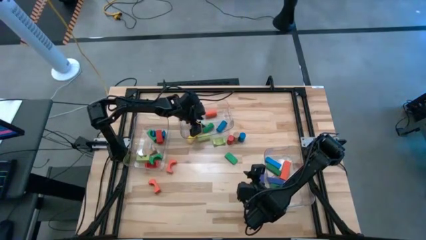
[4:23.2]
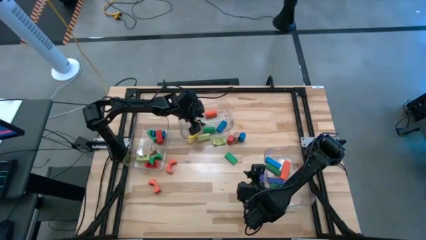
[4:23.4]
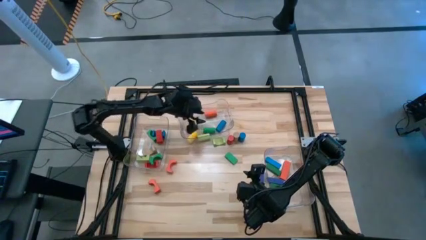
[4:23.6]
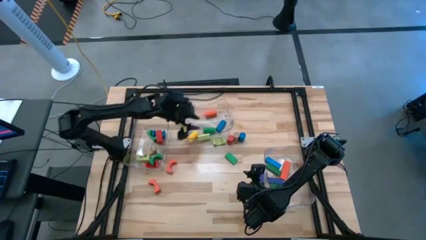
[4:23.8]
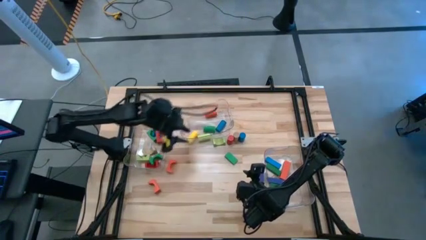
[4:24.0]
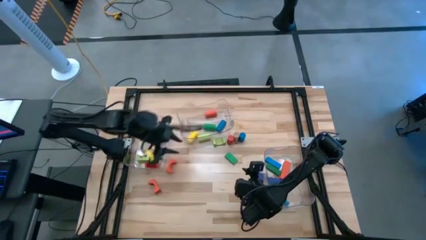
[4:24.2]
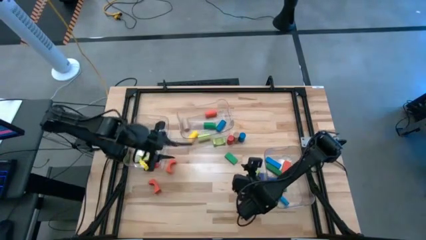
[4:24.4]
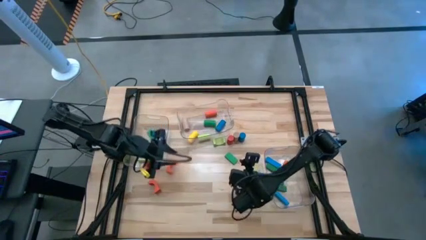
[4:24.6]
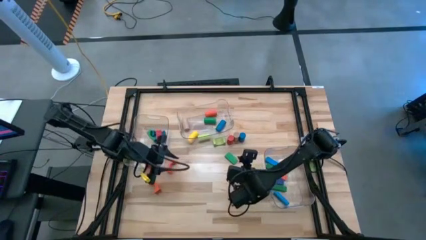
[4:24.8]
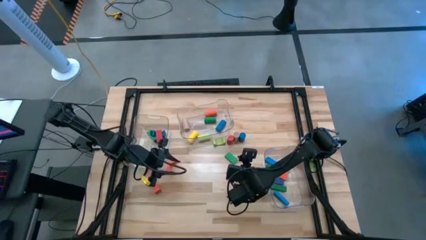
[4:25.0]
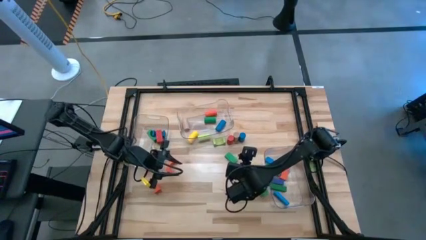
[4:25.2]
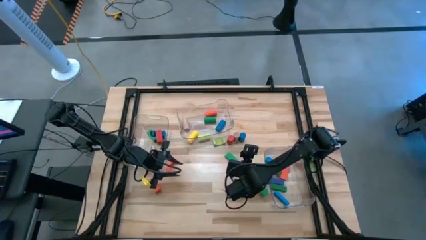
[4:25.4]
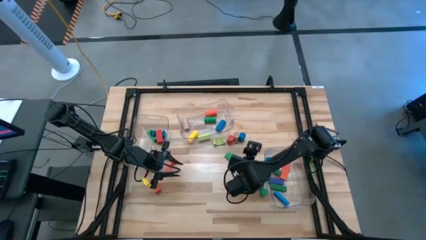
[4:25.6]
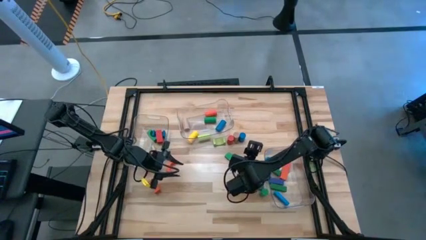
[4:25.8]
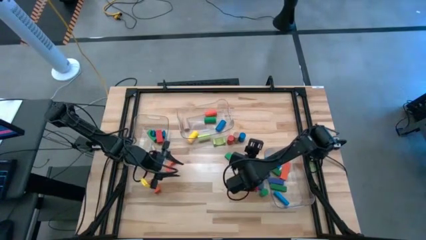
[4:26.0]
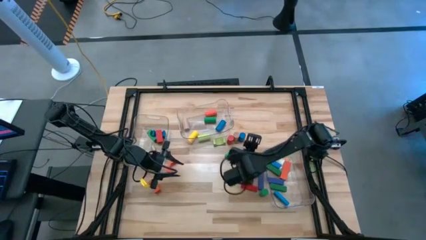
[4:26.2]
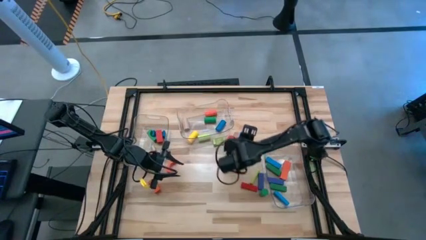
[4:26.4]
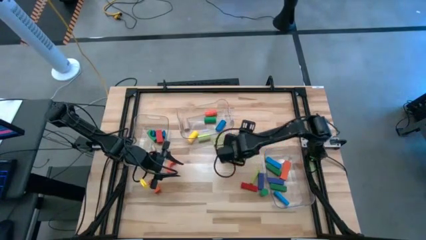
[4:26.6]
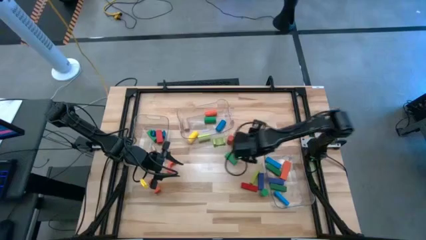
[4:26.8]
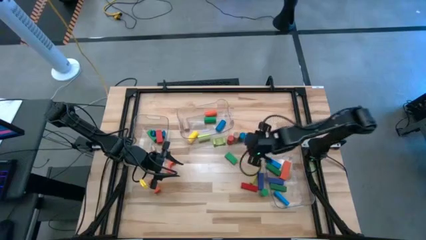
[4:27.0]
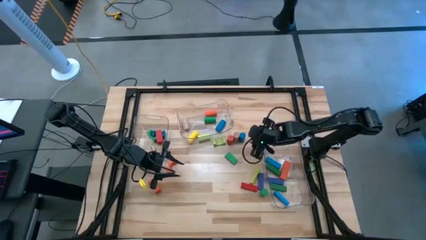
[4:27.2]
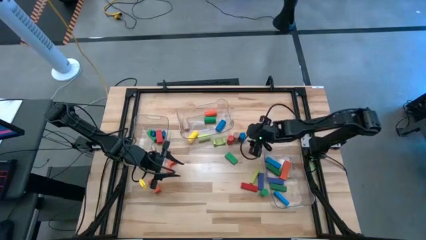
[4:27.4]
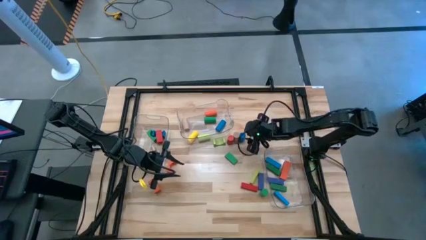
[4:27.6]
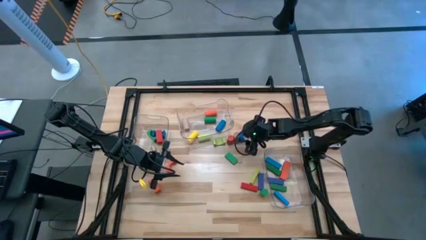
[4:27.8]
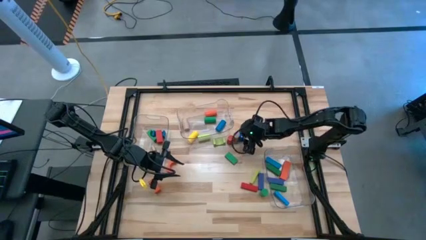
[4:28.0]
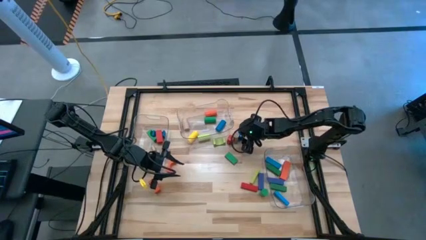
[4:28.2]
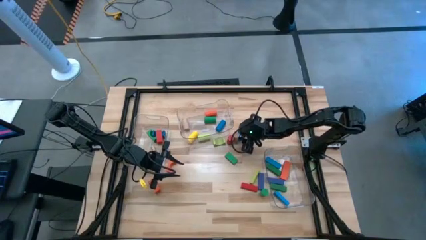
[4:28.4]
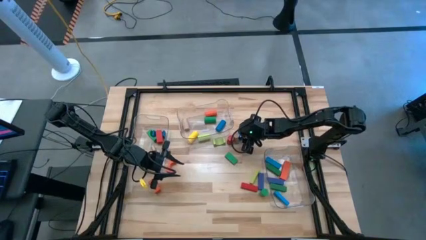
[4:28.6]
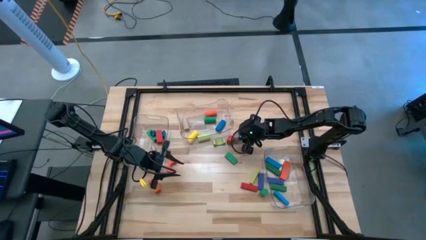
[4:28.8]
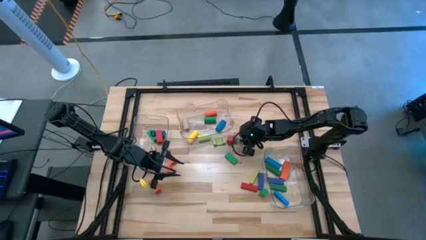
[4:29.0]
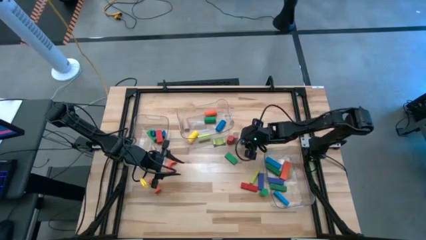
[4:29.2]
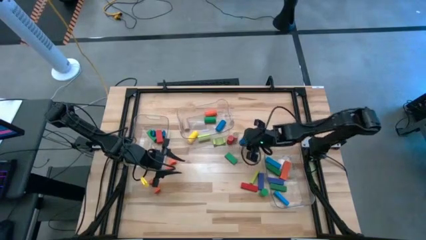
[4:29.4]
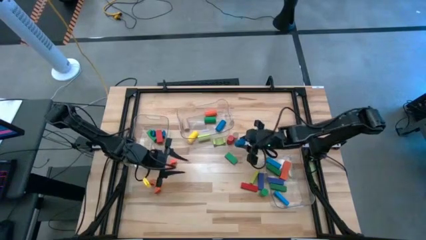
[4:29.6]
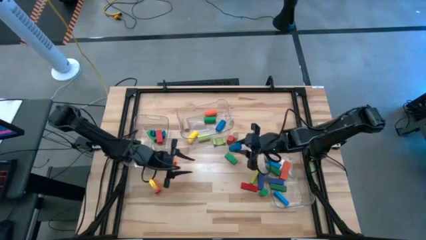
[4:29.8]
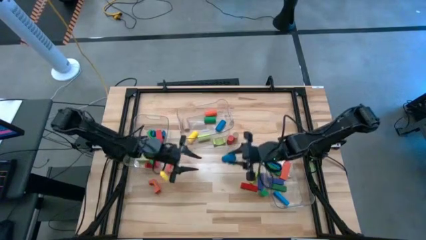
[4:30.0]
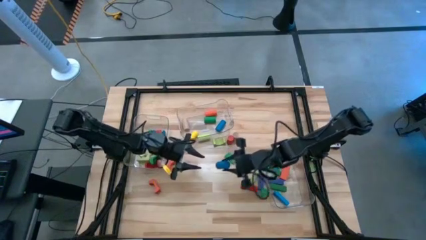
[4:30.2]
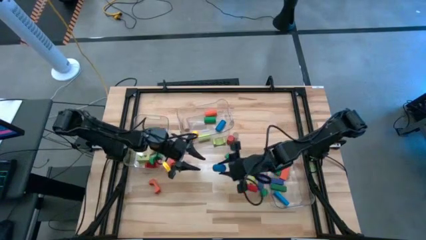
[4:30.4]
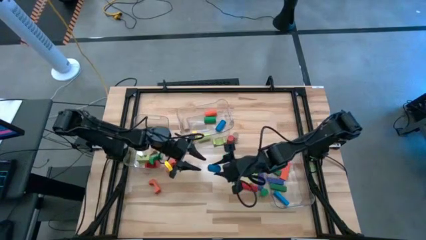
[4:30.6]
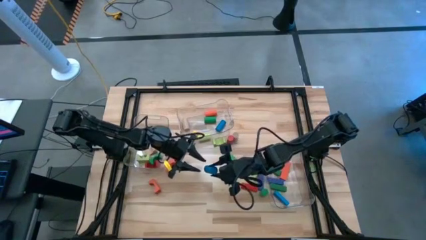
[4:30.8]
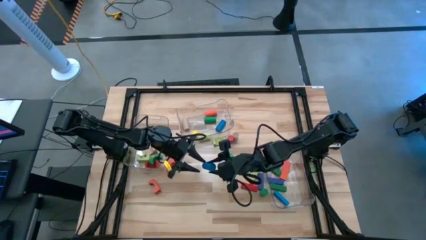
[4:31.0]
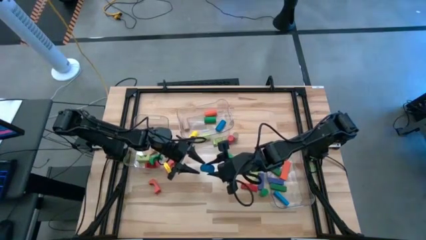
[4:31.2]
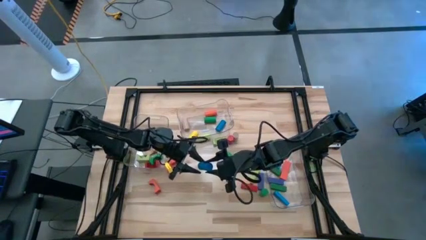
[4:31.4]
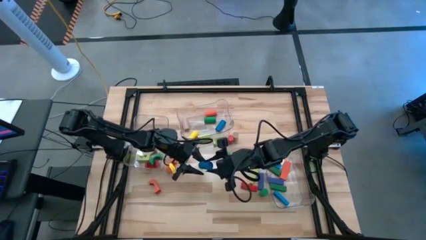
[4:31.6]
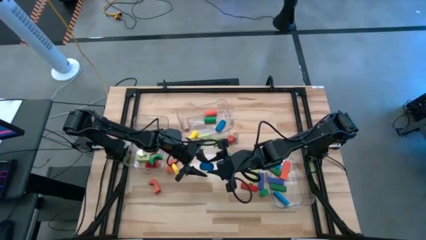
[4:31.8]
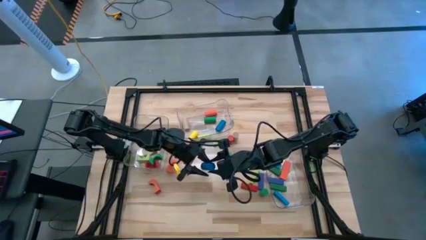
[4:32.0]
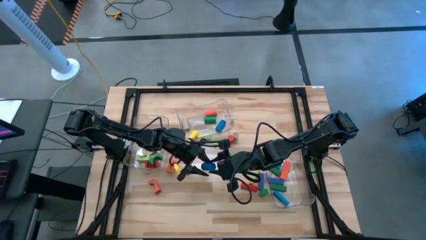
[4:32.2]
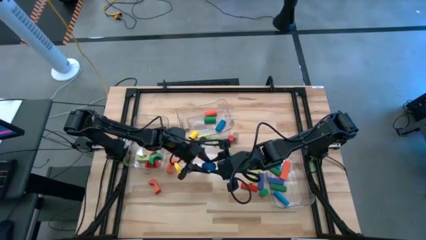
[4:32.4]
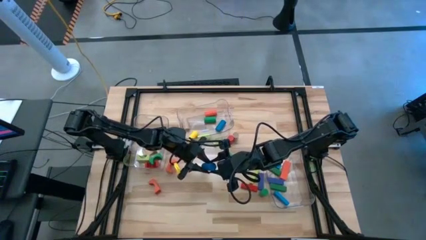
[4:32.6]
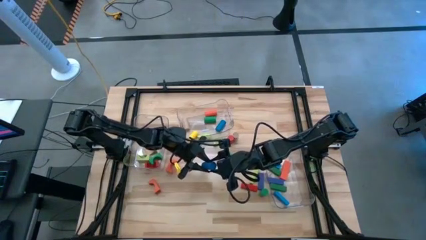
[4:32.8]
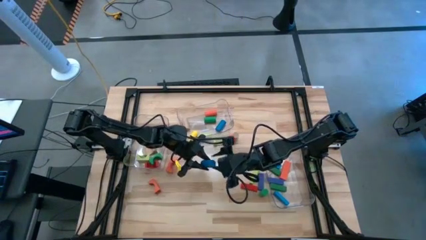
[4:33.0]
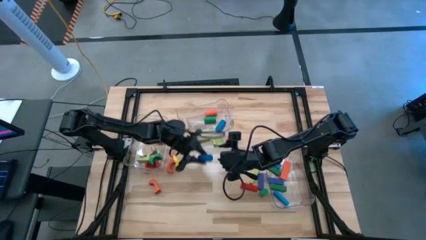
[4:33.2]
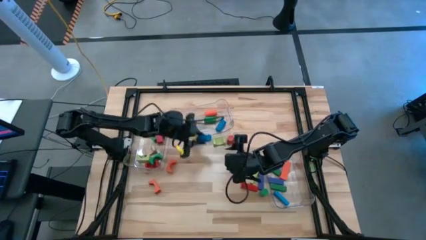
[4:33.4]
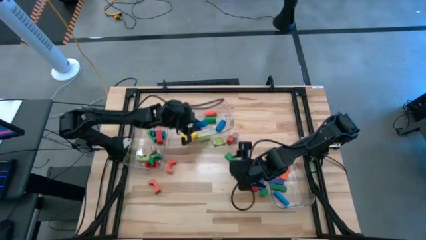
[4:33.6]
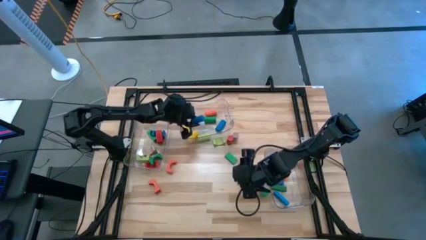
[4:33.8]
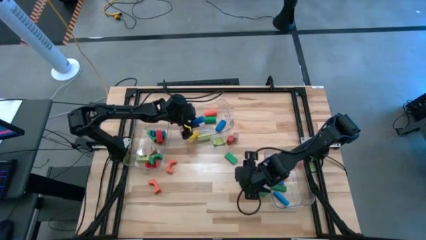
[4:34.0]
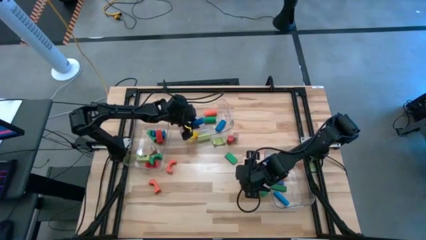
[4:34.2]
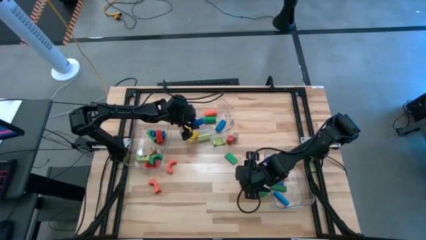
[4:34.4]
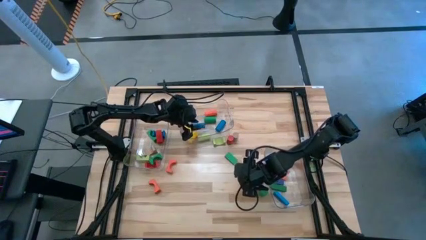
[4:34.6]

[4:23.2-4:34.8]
Task: Sort blocks by size
Put the blue cylindrical block into the top transparent bin

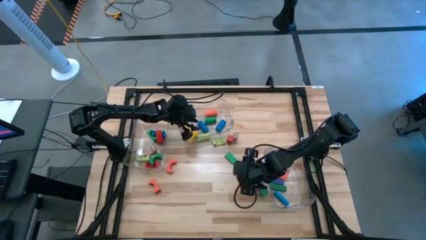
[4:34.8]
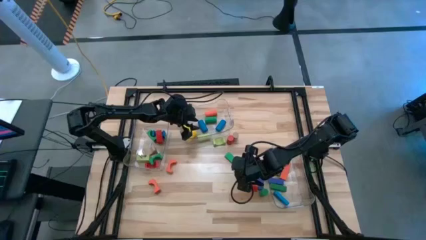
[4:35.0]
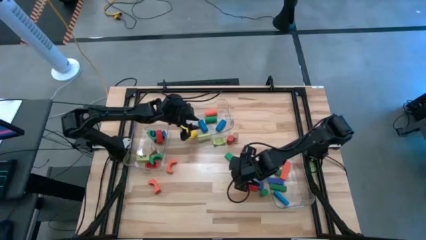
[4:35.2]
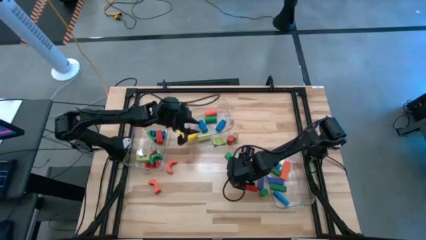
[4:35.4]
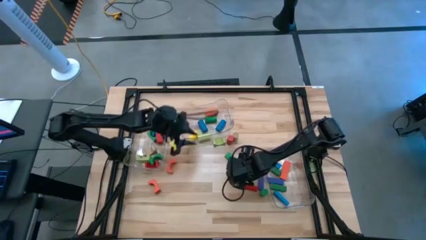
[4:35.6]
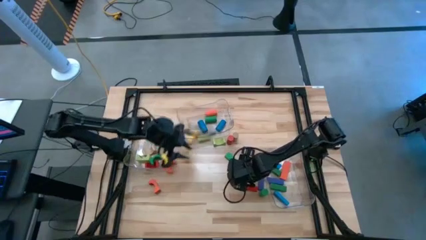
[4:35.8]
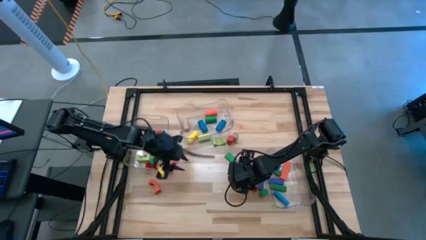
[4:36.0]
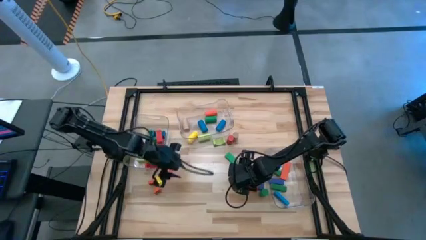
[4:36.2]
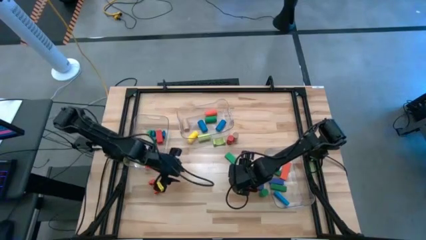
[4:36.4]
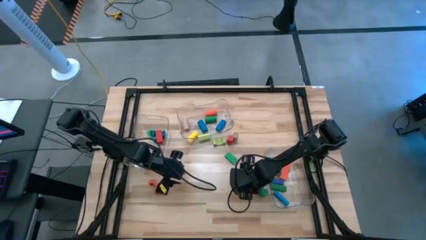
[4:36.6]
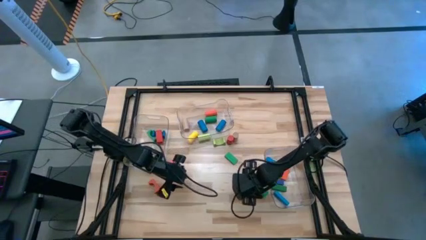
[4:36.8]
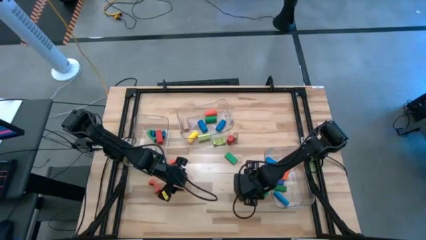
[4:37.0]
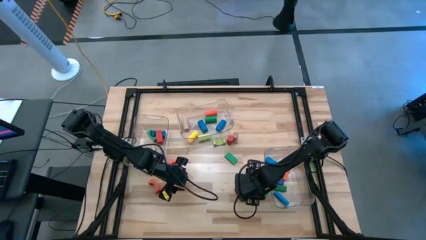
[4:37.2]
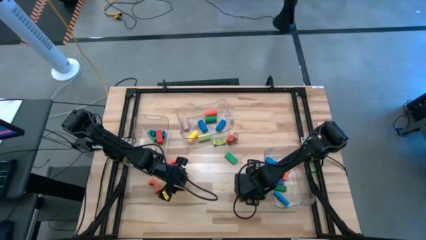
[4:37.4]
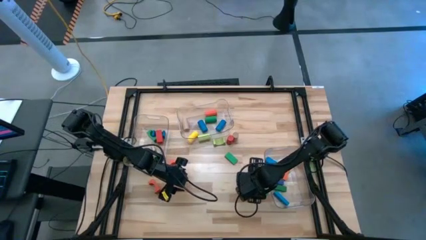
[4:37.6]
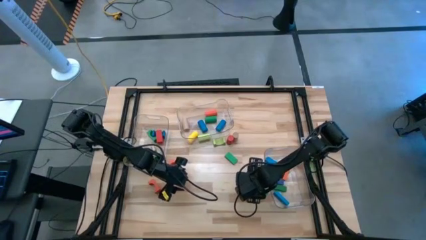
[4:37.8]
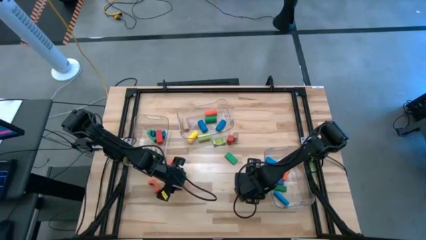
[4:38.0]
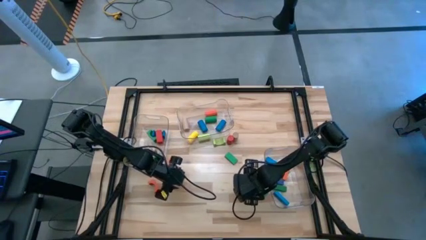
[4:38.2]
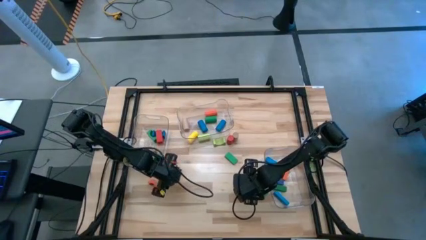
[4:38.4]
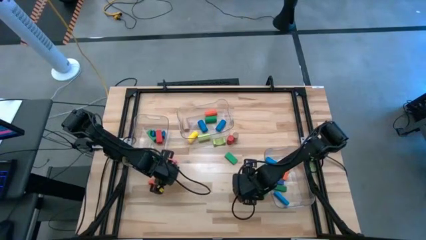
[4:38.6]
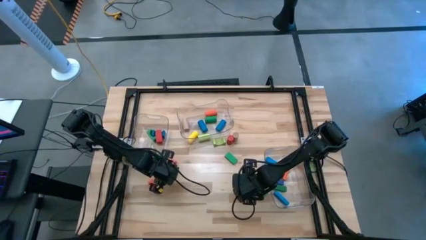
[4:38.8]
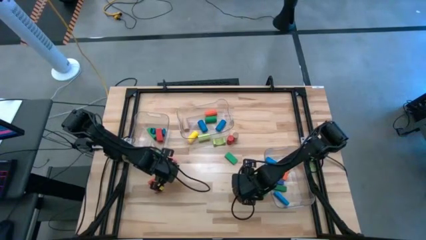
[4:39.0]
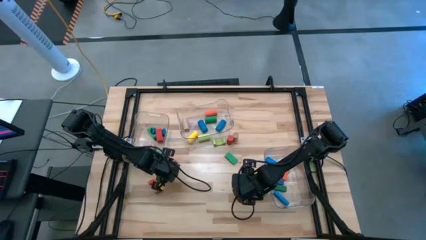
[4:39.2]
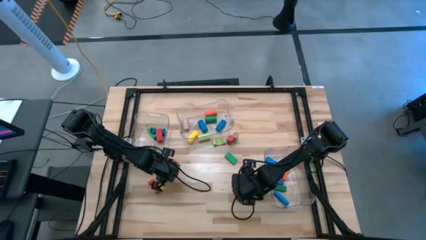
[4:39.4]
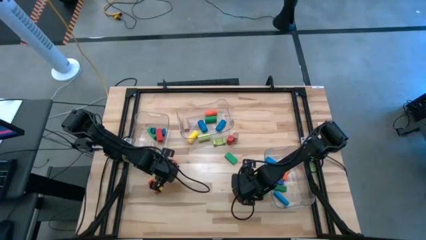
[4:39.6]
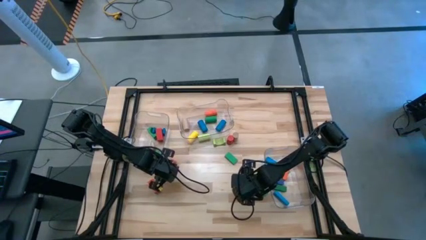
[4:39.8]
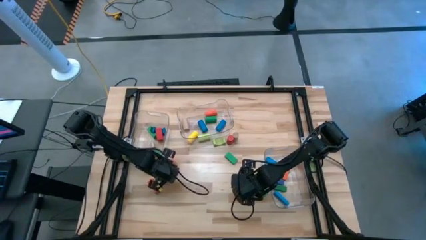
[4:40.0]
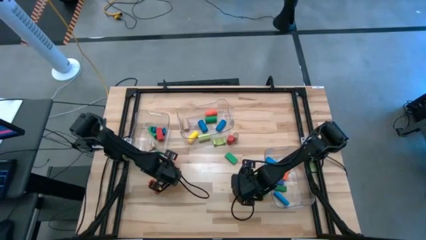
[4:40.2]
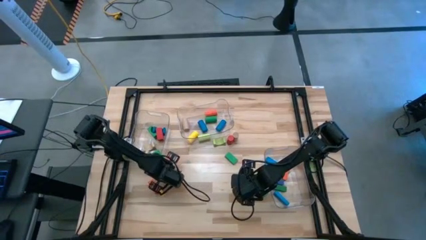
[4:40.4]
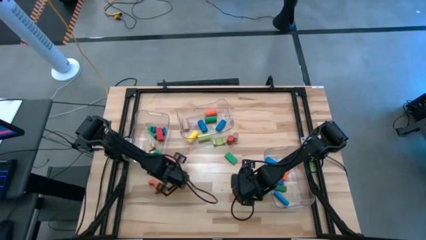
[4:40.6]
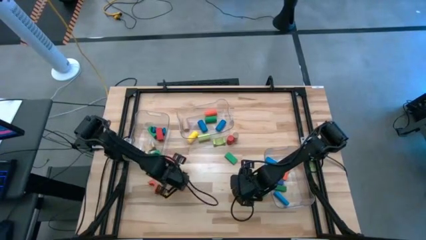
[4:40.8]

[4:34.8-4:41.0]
Put the orange arch block into the left transparent bin
